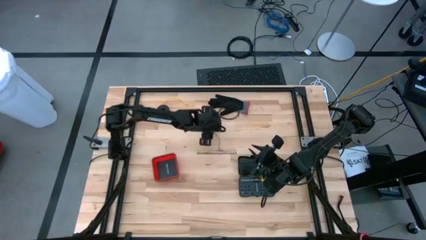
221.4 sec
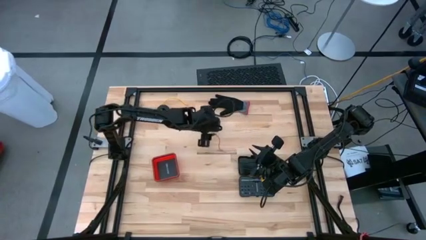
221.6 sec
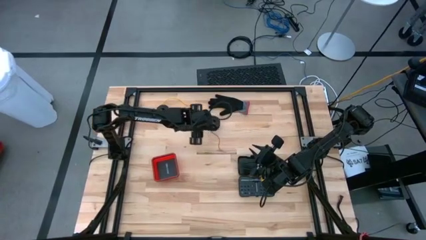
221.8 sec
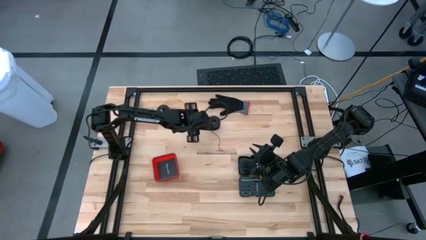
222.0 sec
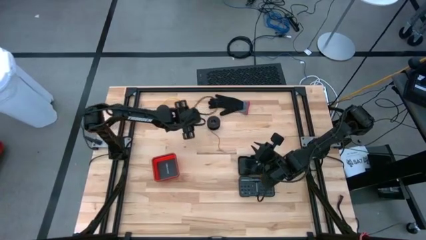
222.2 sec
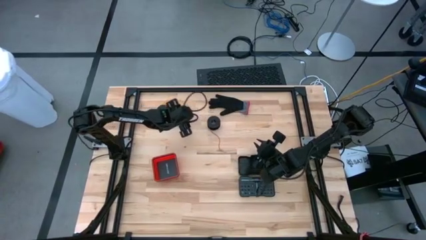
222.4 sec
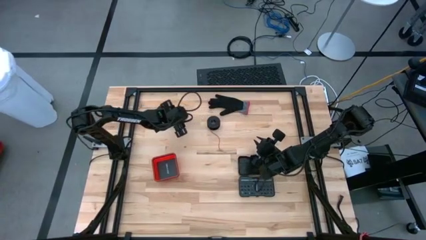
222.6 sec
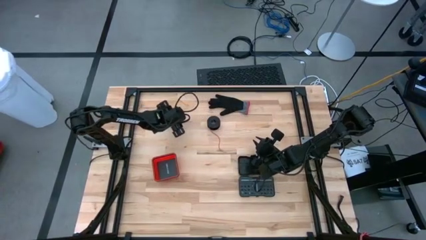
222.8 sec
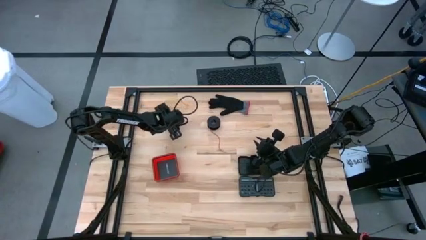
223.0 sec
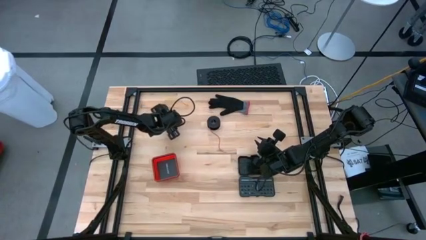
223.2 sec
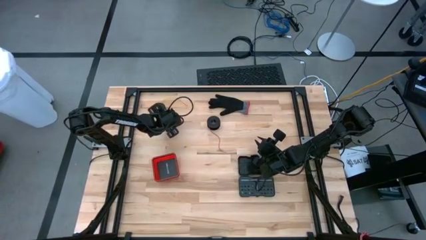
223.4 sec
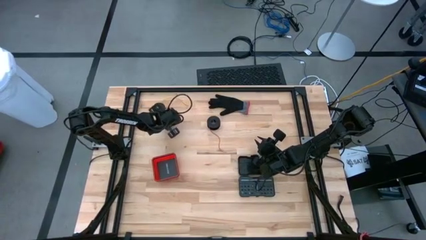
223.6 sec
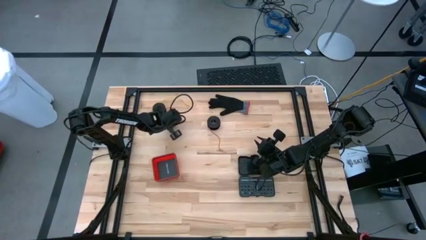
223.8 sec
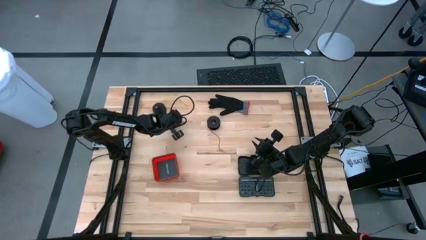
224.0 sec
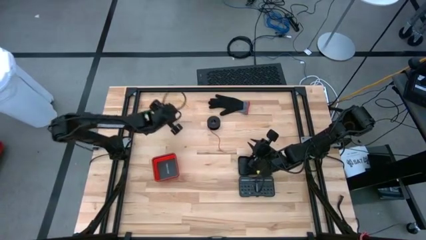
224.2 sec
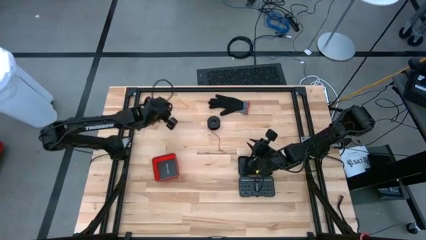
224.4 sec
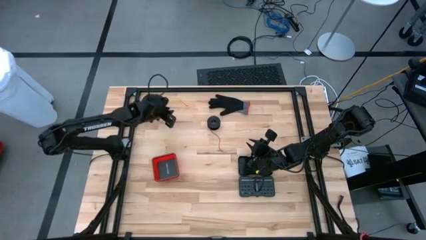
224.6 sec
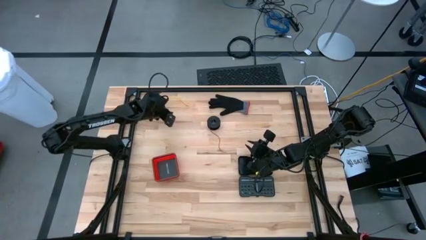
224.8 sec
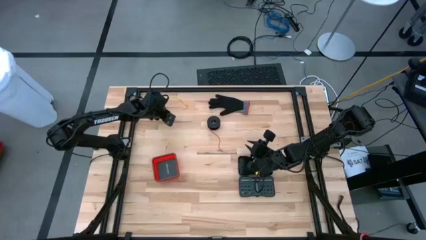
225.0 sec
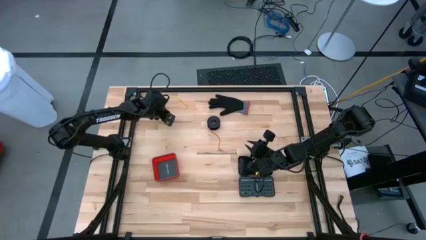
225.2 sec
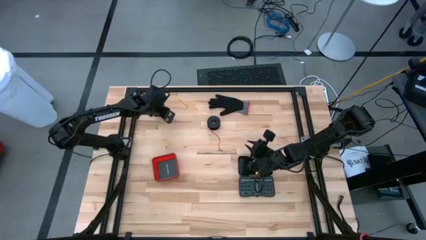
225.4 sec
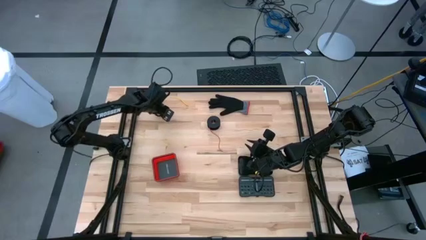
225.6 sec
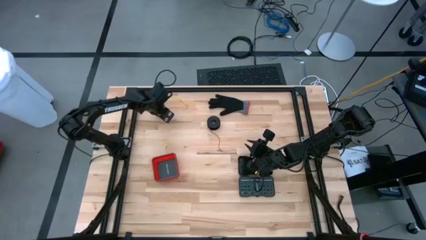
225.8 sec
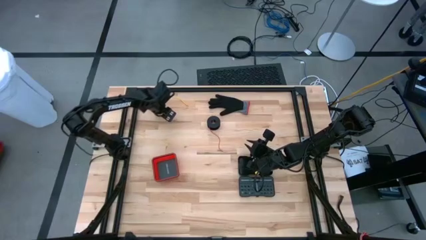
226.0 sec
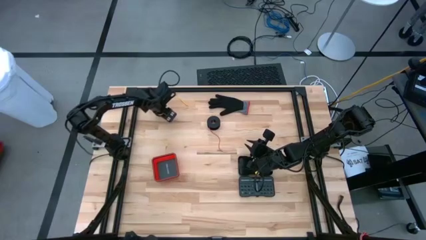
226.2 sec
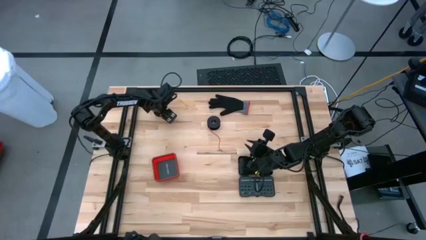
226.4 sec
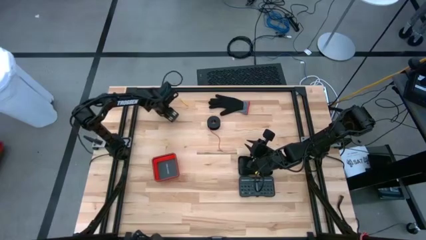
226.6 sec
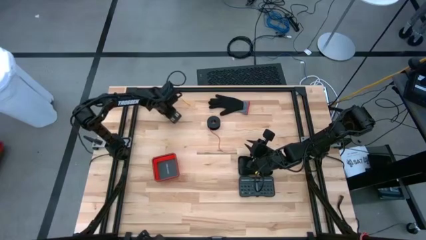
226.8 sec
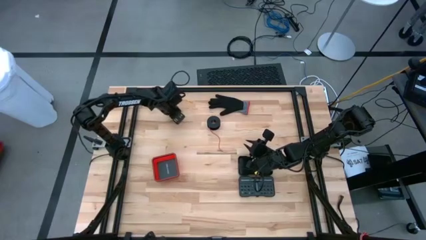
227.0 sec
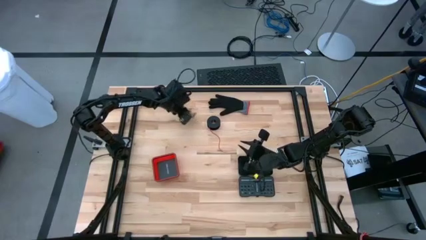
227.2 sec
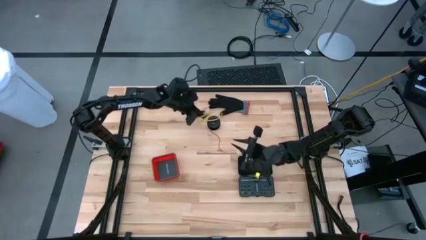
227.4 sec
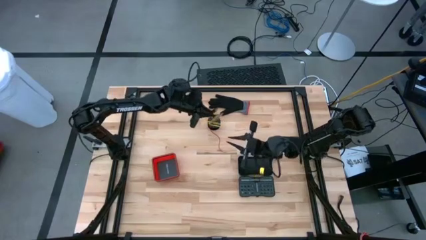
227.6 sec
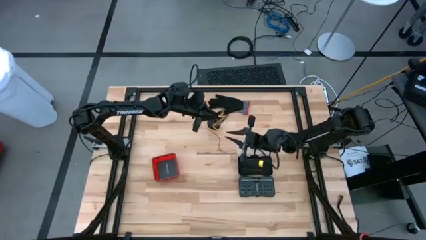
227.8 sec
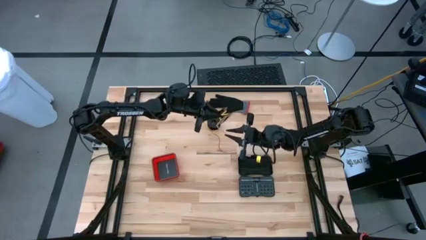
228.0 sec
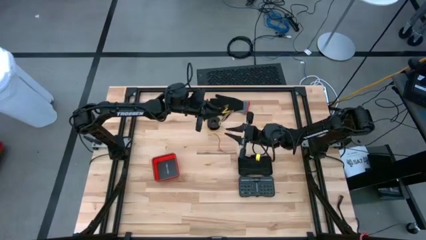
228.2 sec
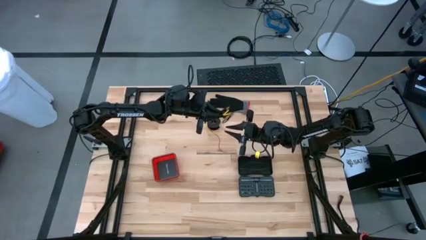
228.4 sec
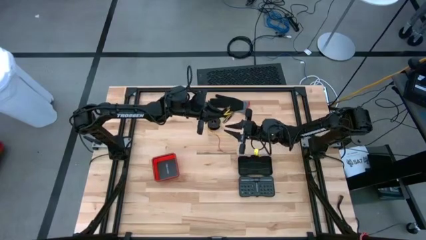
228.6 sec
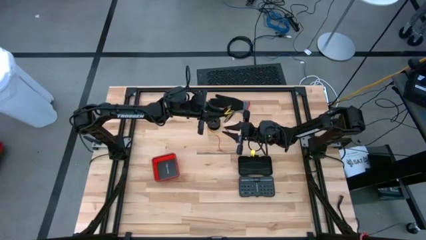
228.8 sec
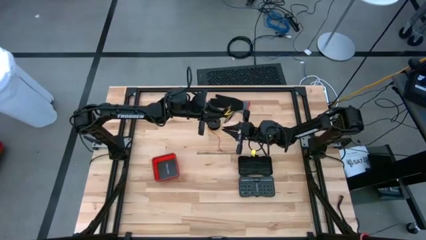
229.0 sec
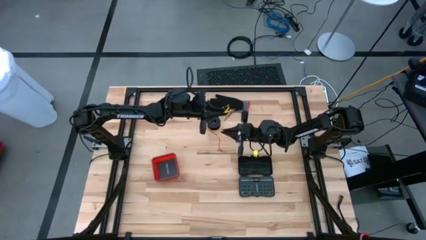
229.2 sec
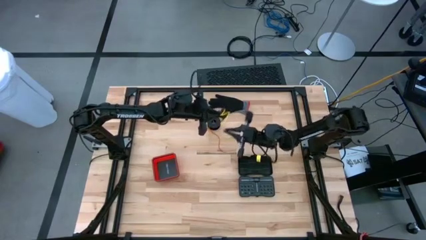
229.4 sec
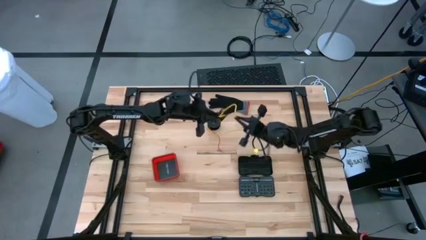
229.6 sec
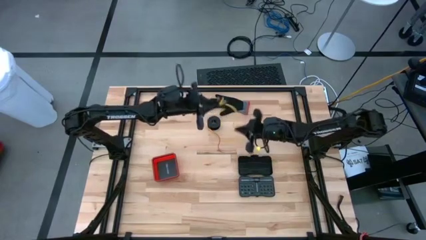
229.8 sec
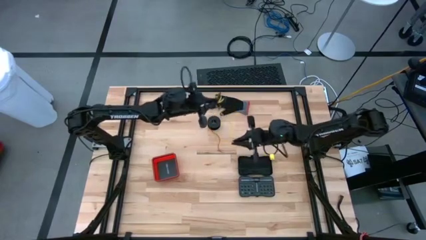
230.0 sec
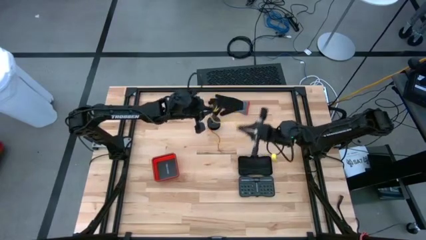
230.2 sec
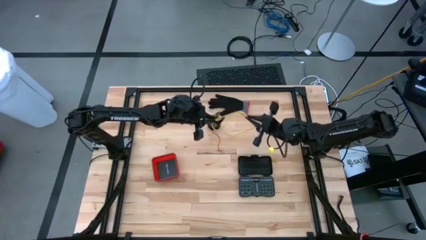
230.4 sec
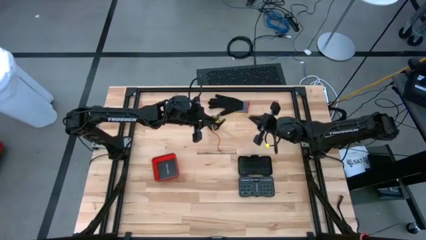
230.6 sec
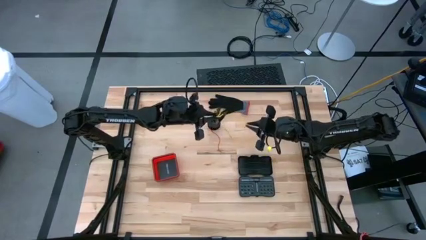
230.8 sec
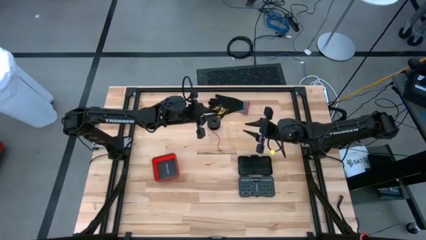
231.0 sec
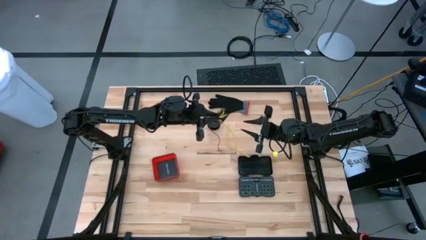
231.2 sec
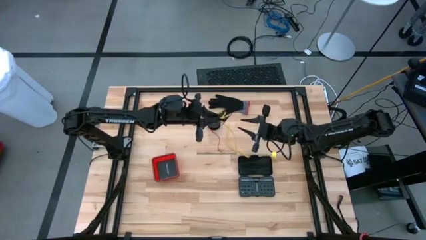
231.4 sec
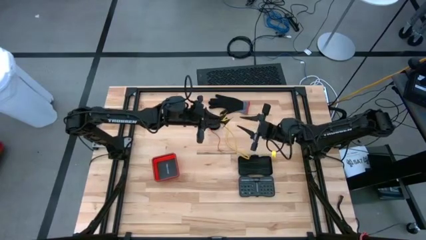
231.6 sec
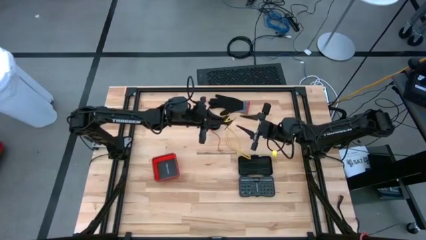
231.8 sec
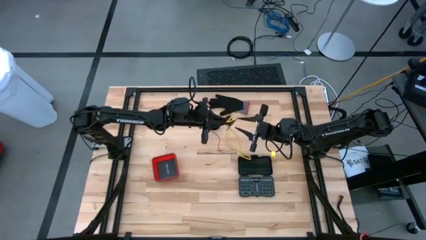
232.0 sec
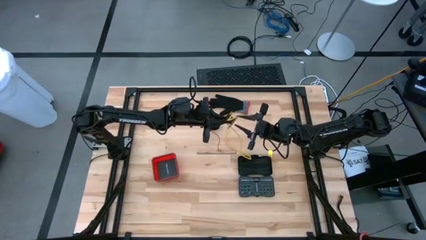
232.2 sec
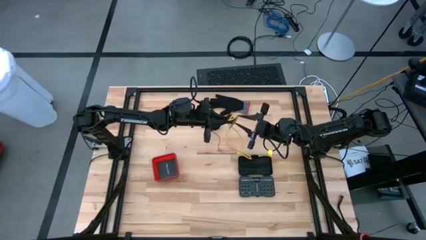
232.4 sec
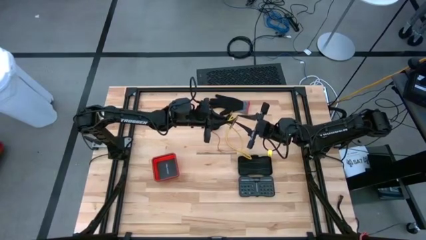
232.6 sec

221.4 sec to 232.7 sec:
Task: Coil cords
Uncoil the yellow wire from the spool

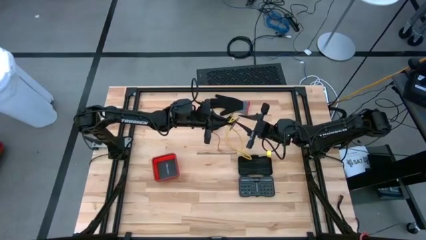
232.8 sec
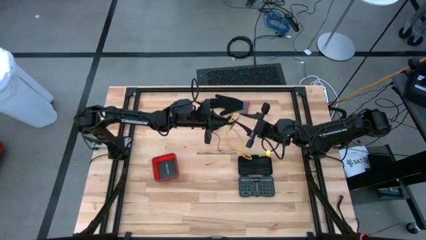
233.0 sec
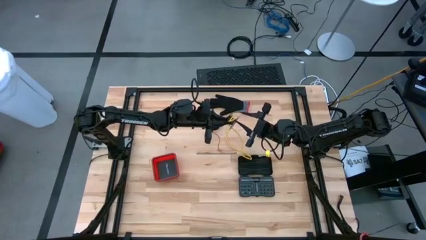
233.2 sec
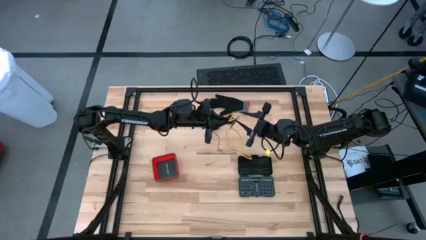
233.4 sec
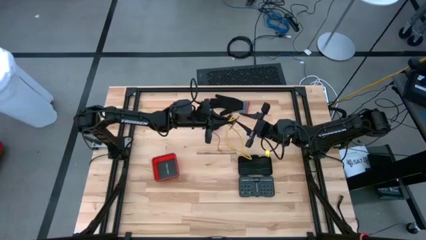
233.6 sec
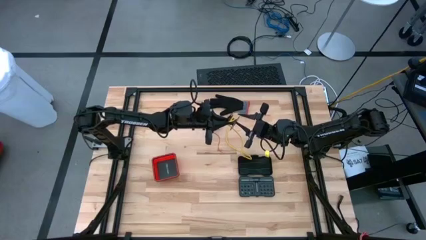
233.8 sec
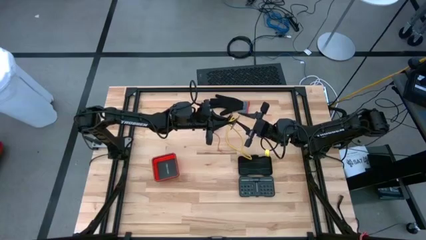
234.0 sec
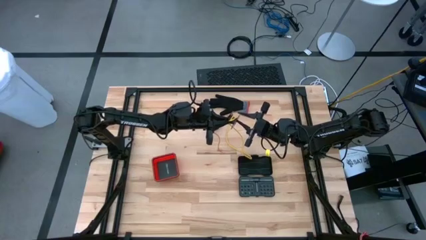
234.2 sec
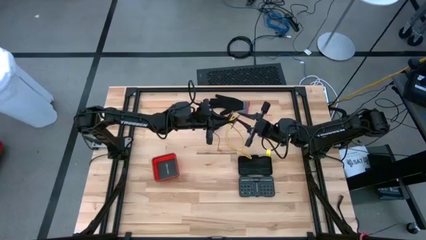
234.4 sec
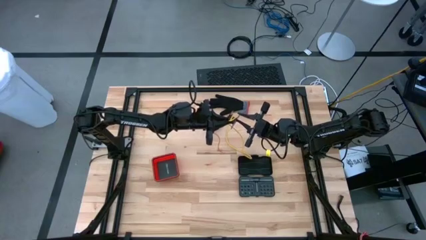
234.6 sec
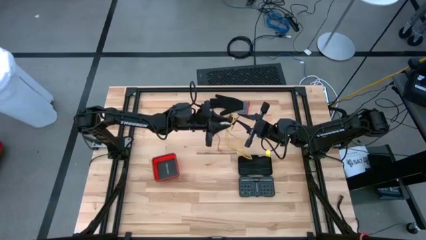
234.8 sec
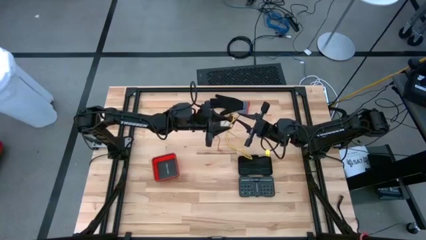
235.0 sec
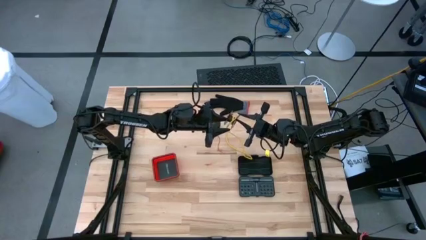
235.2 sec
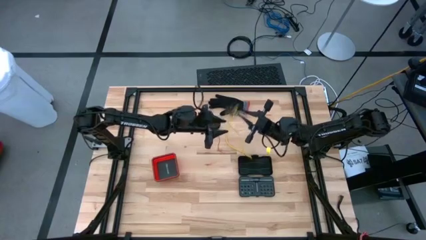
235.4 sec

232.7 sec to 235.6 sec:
Uncoil the yellow wire from the spool
